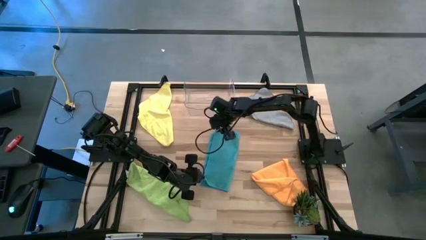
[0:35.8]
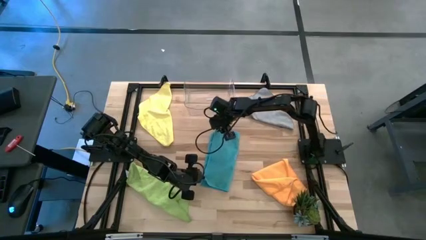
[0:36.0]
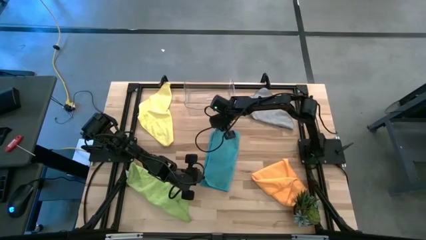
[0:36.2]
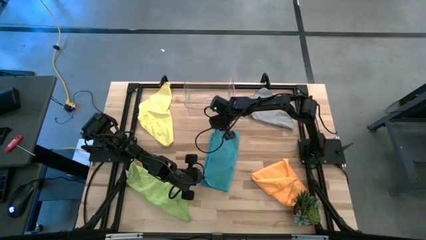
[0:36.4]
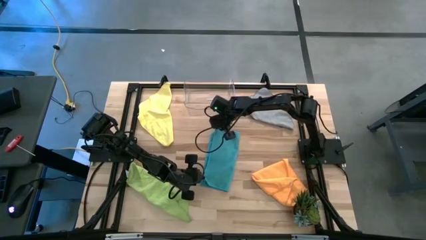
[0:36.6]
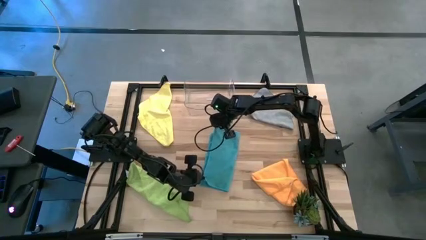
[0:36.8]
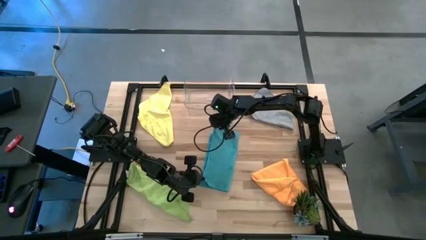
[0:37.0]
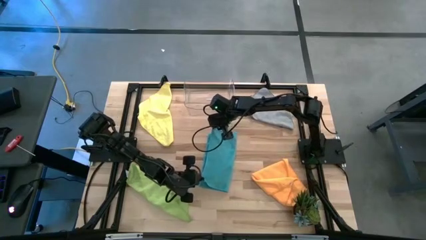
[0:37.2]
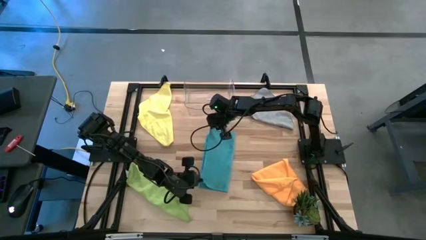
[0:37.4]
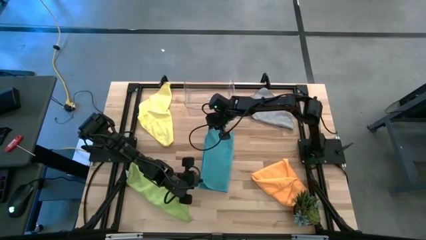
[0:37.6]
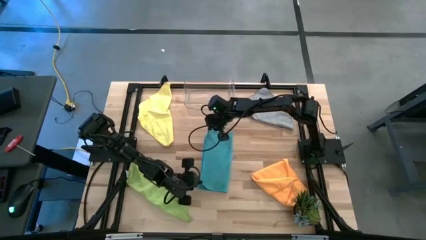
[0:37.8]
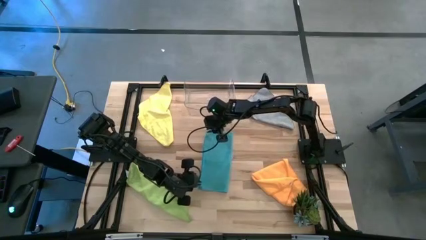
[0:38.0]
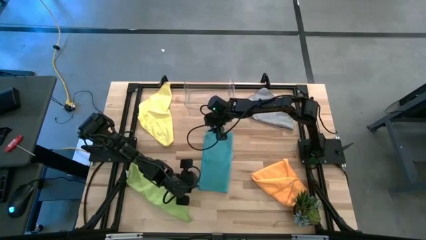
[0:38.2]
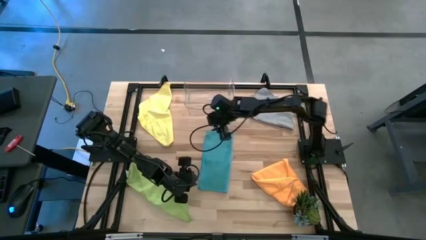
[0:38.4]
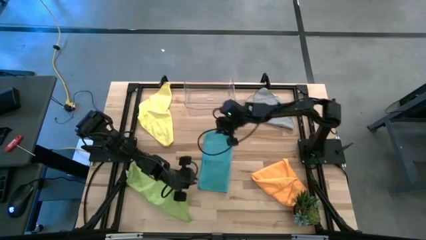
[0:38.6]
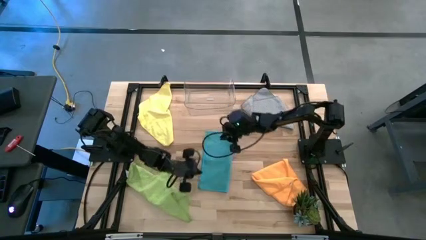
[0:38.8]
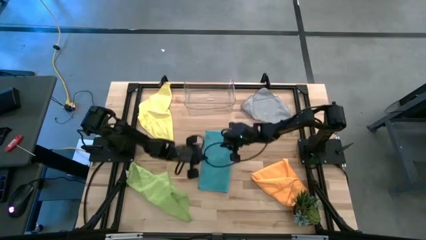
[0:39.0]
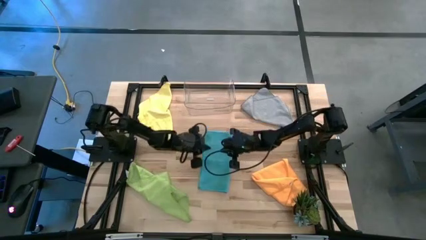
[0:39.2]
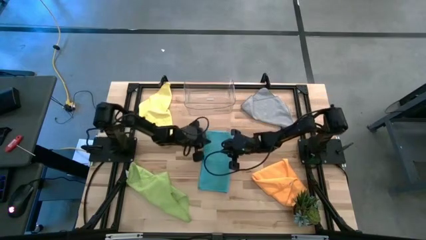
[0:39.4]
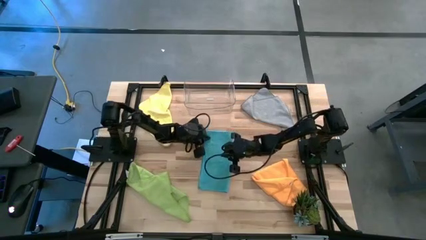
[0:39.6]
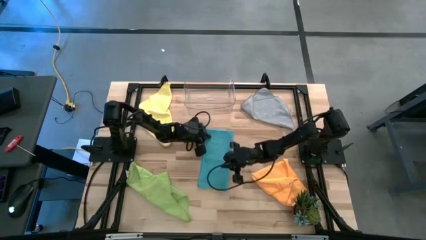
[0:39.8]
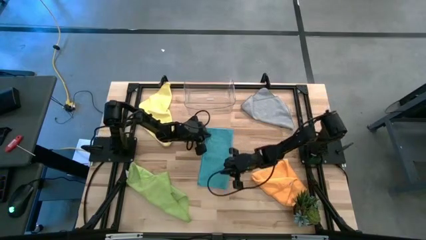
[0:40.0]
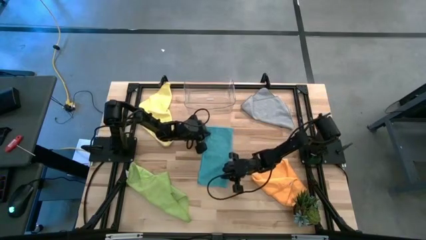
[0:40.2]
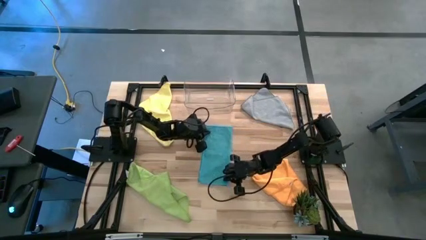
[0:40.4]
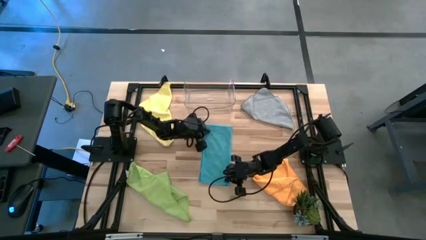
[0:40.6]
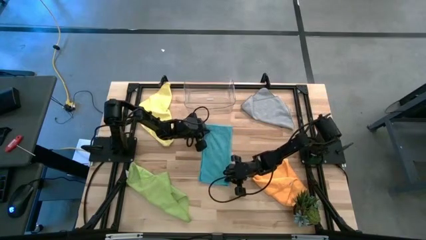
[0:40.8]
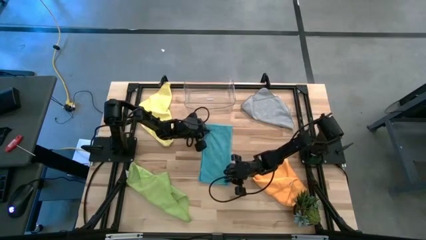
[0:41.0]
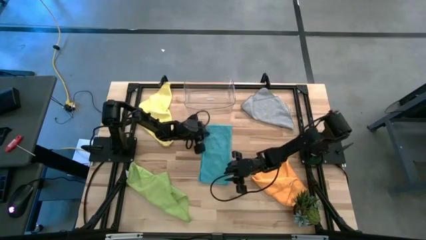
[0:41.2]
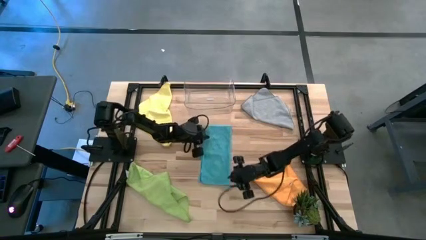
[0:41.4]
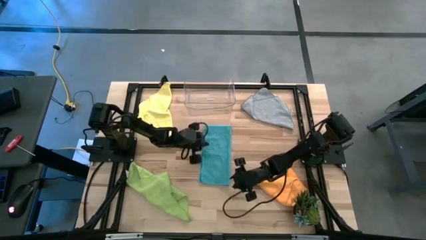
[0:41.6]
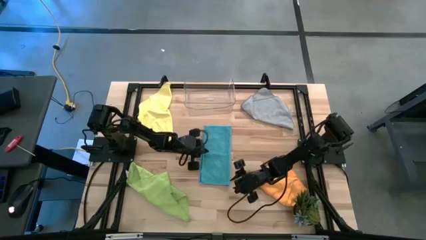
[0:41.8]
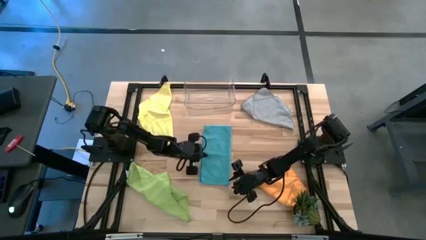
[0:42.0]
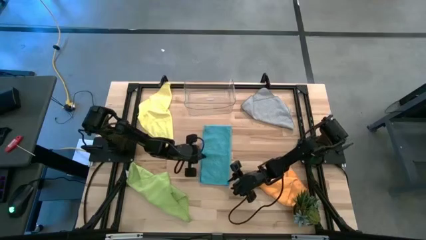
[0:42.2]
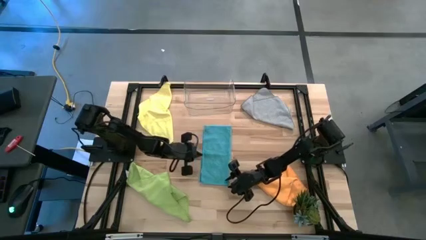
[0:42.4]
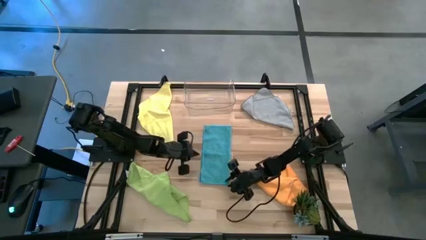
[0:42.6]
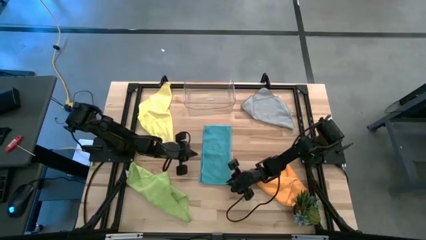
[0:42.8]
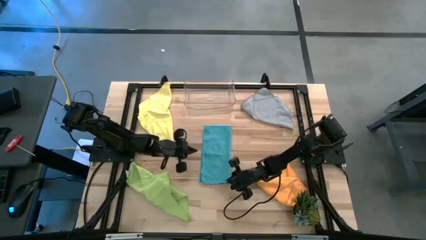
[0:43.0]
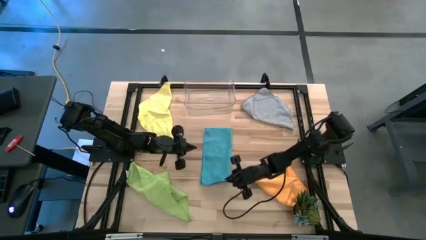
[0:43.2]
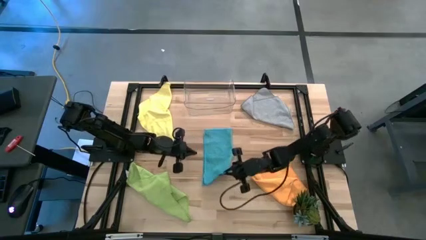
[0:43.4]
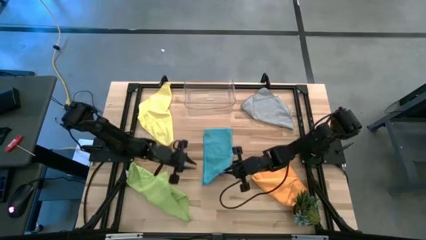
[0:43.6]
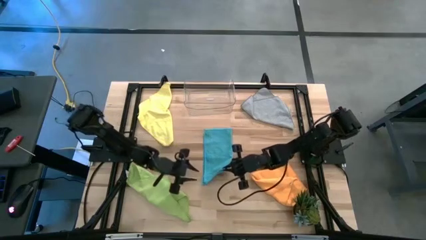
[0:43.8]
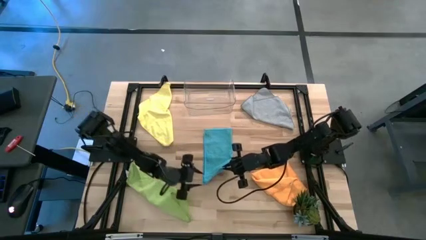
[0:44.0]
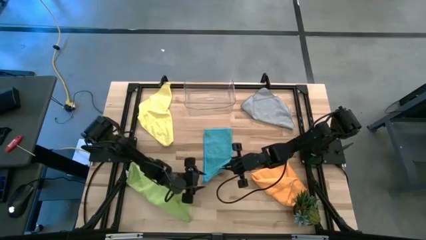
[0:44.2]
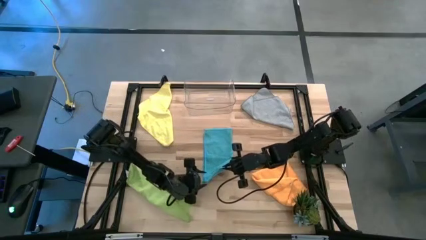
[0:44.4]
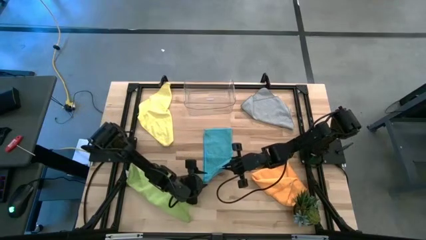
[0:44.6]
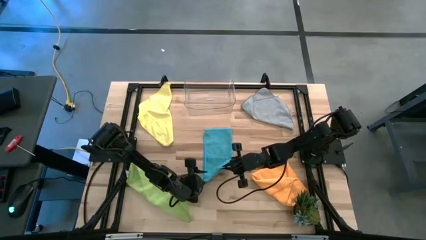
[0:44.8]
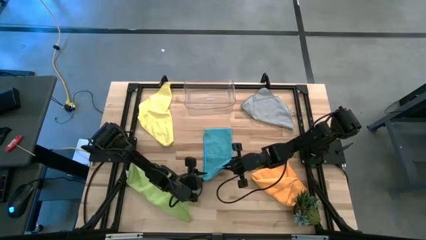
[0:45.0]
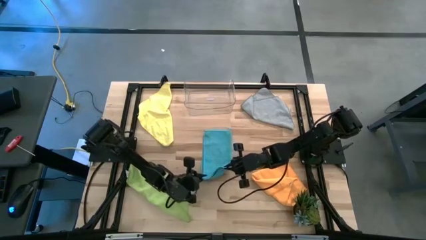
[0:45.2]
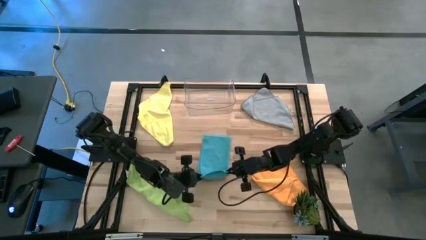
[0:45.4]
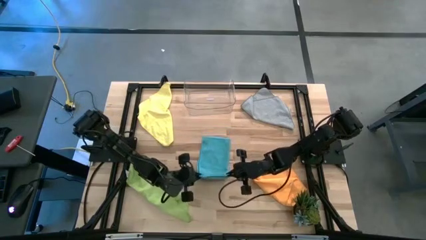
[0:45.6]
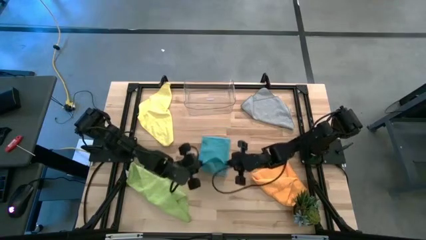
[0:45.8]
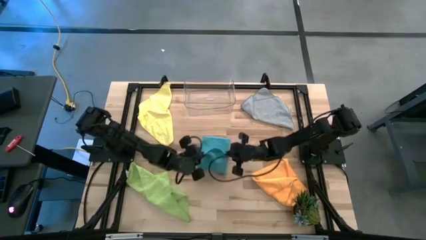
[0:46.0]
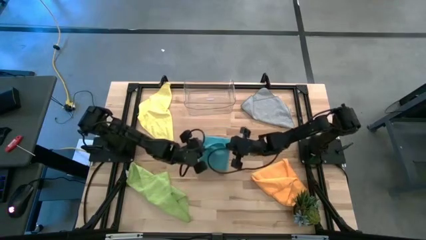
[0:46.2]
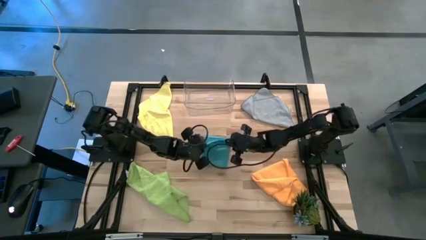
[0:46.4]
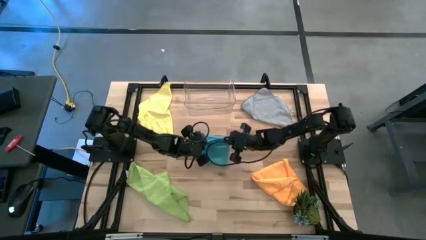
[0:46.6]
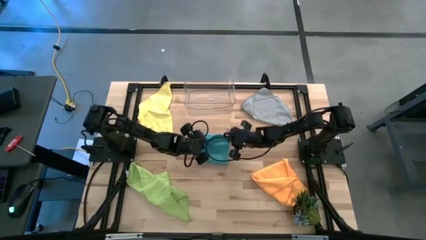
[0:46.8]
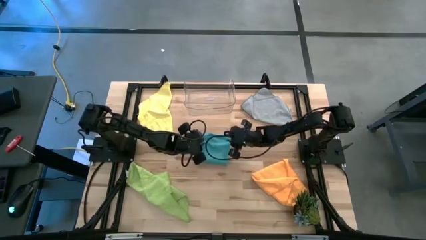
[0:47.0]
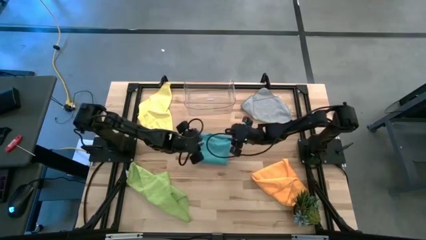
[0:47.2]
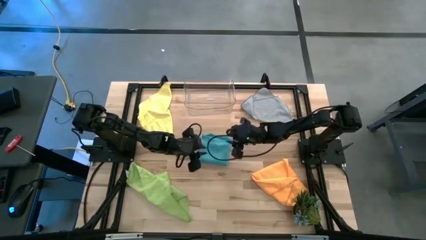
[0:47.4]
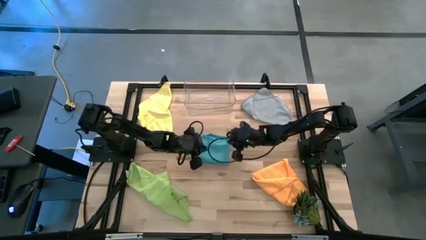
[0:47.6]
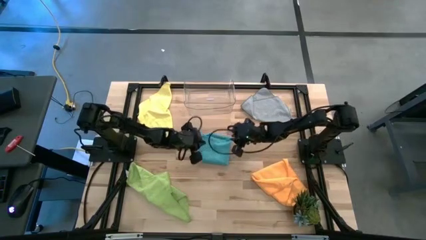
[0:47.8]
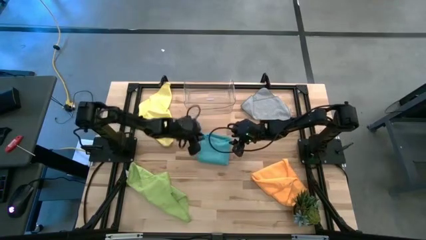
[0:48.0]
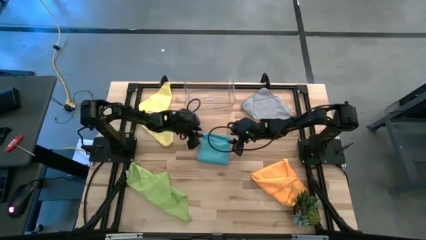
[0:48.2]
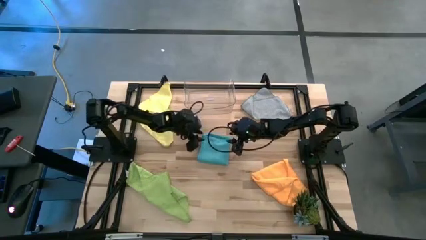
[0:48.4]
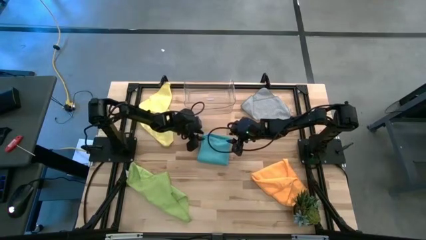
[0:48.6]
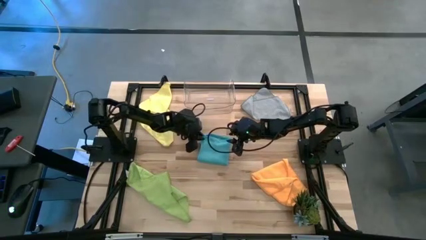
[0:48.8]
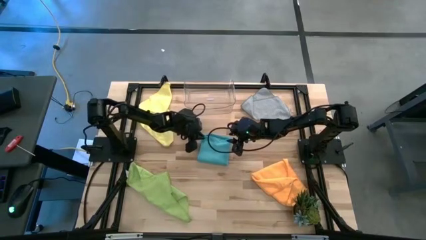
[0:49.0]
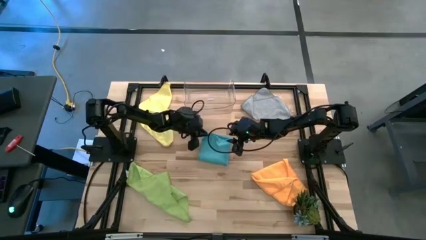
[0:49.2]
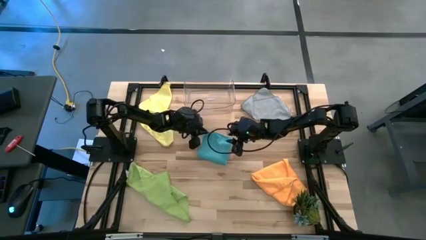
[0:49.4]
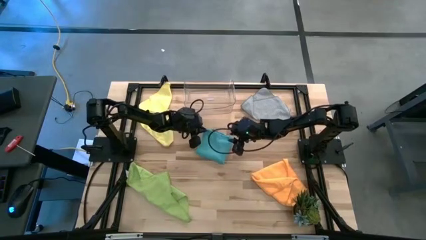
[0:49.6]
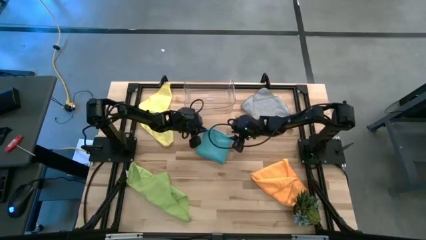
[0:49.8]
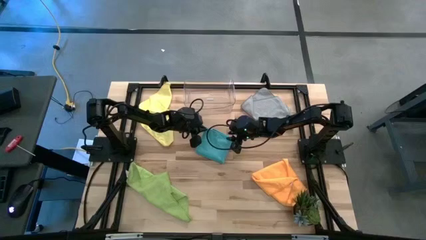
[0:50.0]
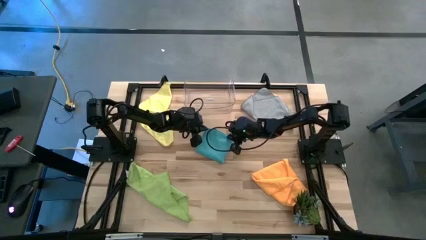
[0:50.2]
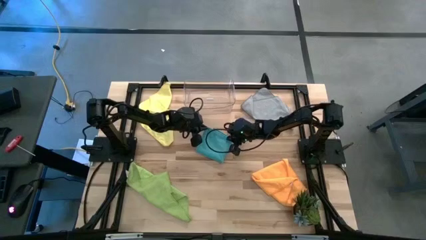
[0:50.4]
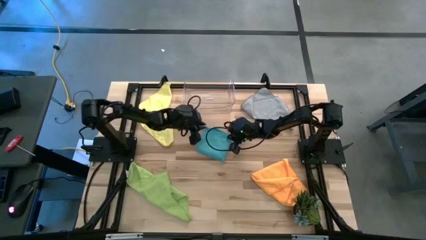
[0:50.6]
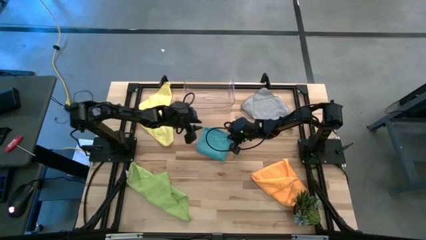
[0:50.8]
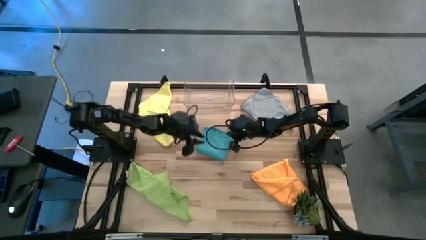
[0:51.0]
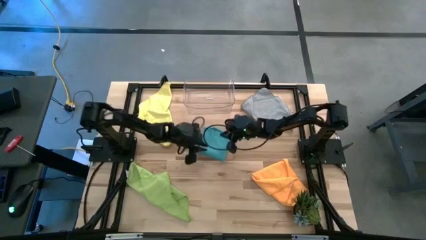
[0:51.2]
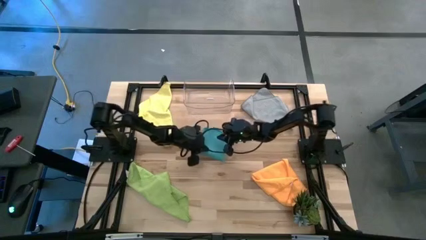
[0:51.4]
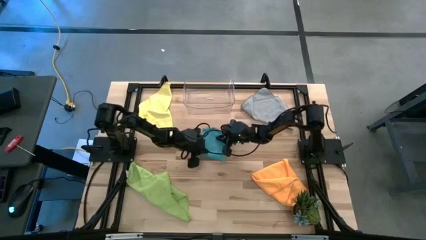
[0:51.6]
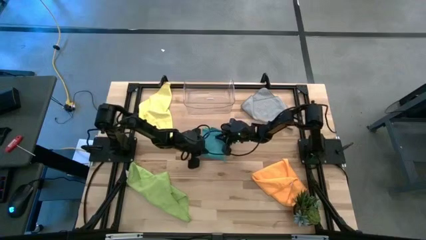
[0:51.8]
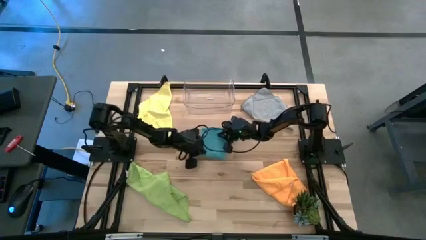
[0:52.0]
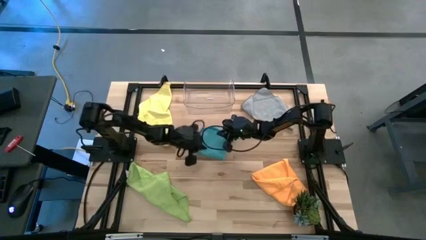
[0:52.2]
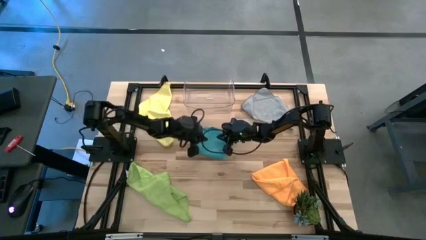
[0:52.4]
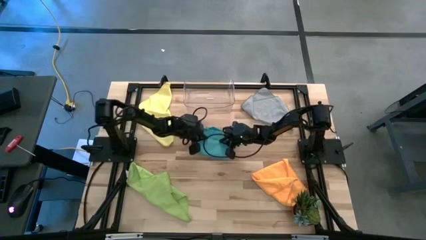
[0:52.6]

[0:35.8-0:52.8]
Task: Fold microfiber towels
Fold the blue towel
